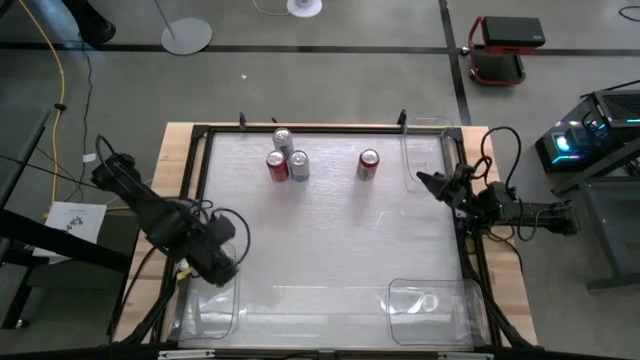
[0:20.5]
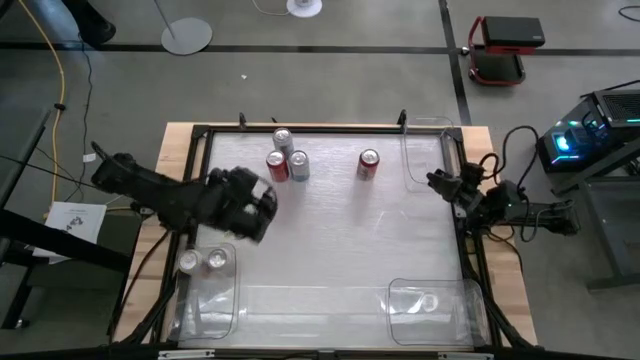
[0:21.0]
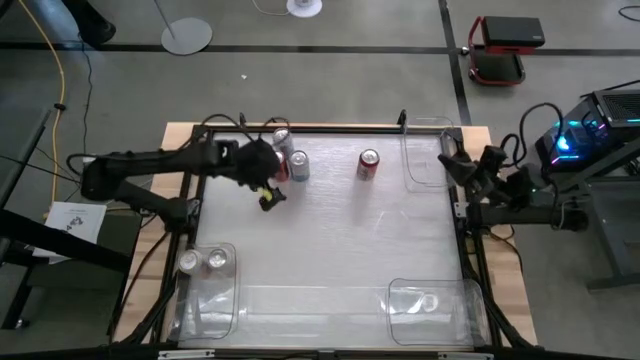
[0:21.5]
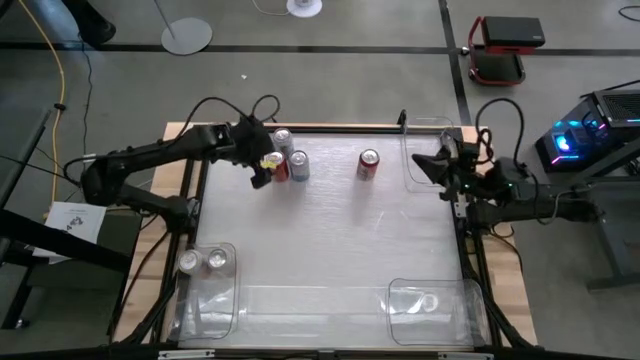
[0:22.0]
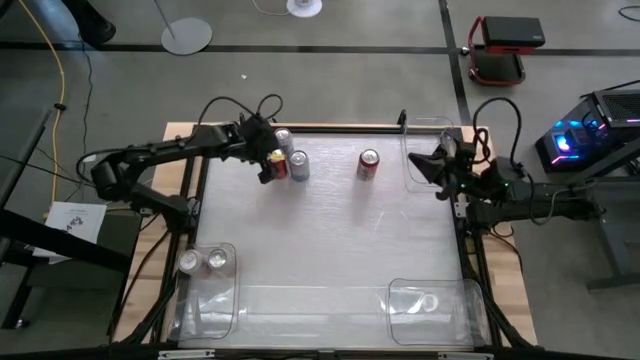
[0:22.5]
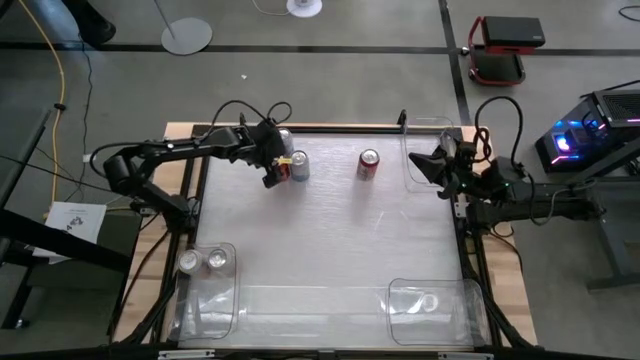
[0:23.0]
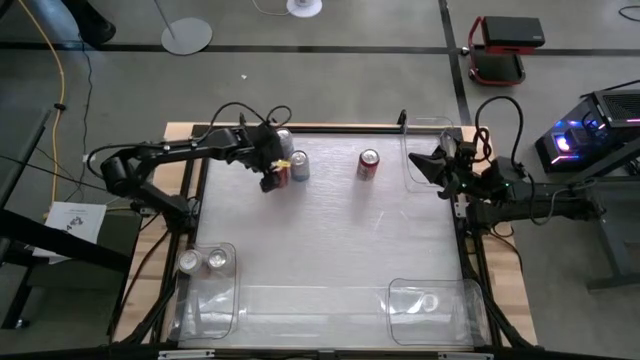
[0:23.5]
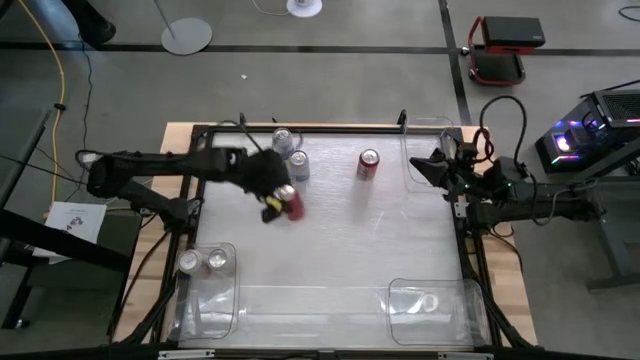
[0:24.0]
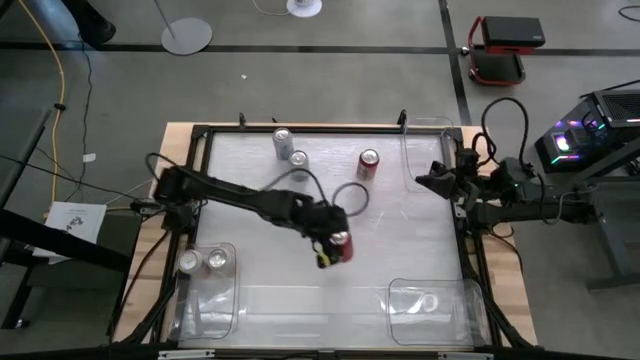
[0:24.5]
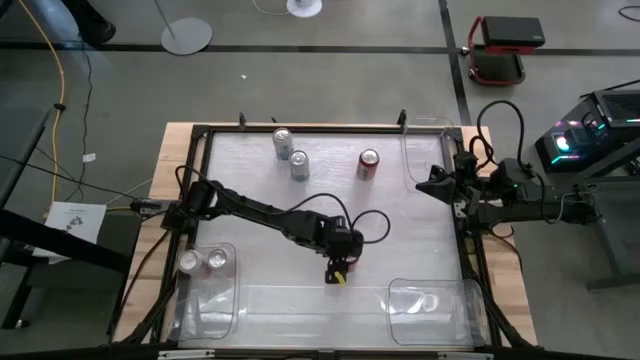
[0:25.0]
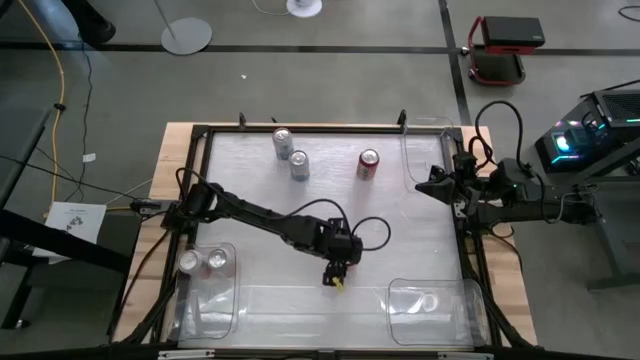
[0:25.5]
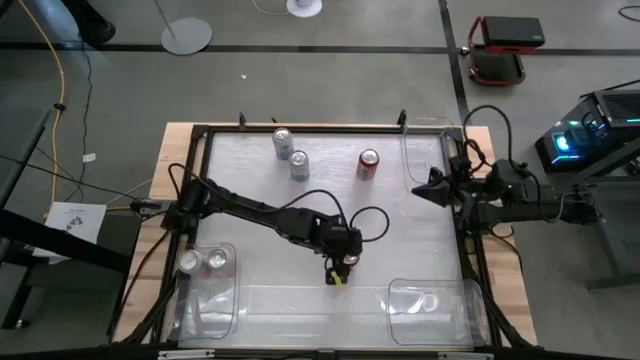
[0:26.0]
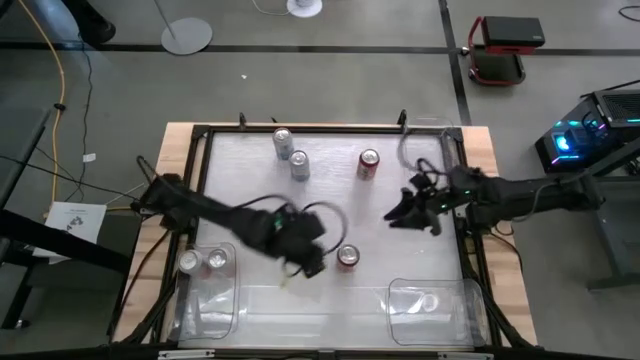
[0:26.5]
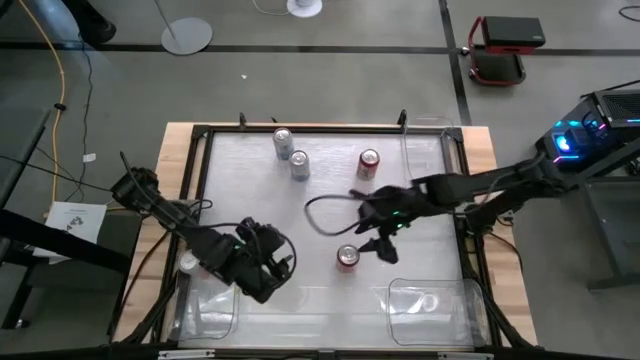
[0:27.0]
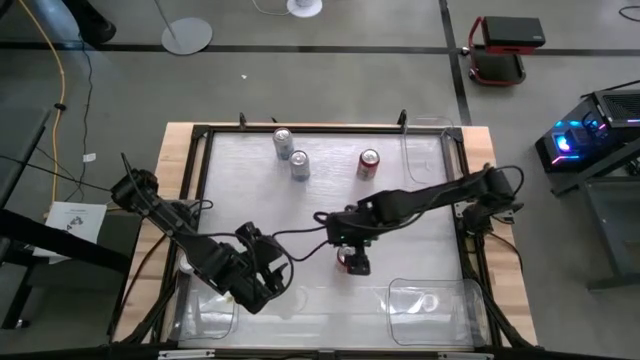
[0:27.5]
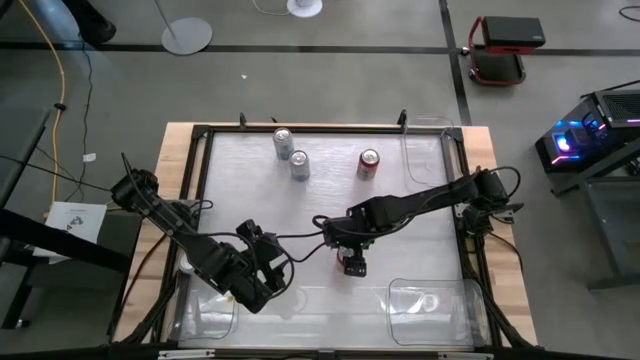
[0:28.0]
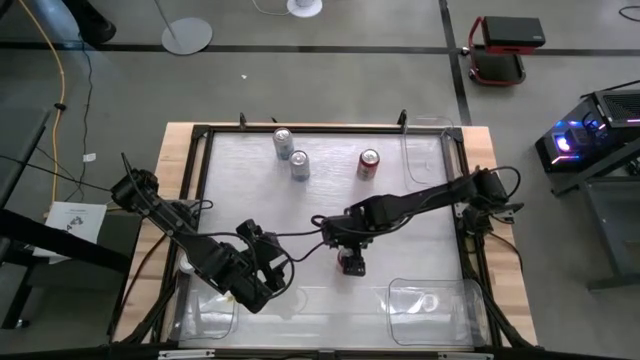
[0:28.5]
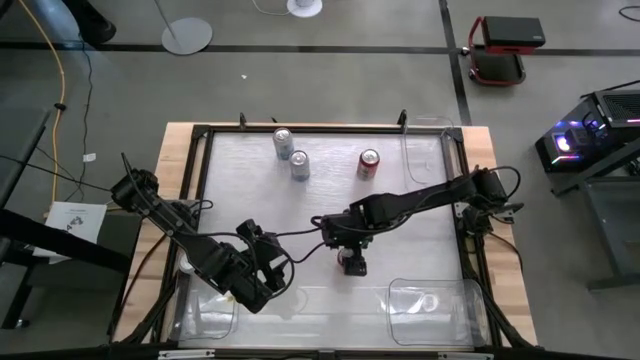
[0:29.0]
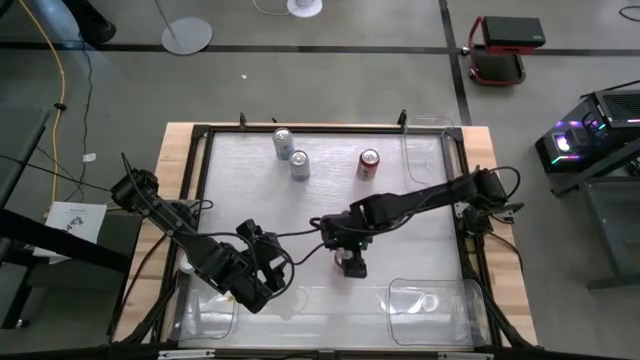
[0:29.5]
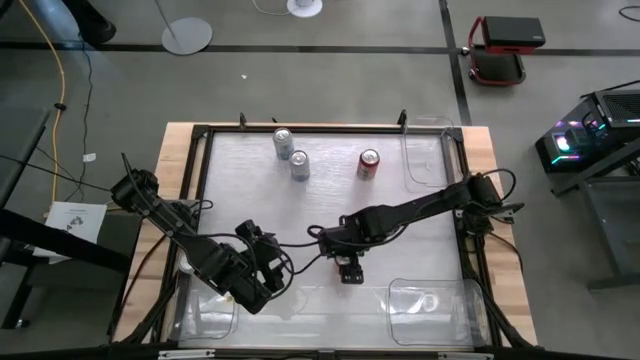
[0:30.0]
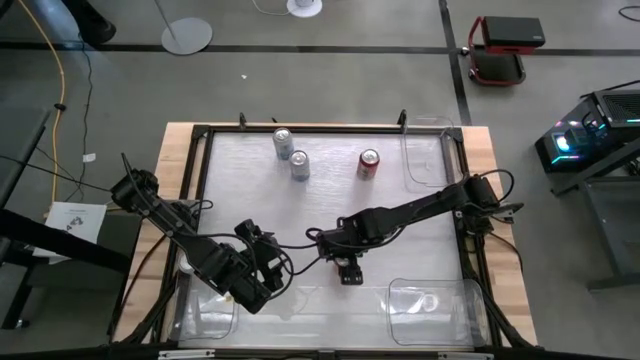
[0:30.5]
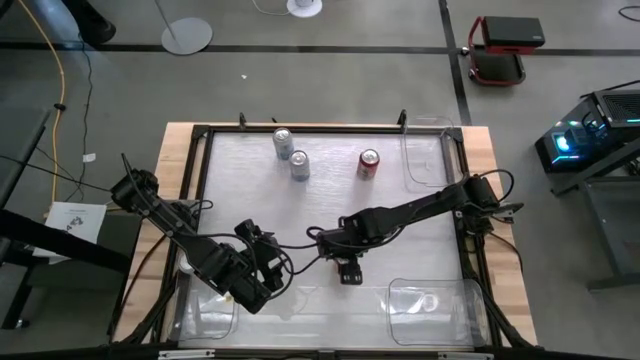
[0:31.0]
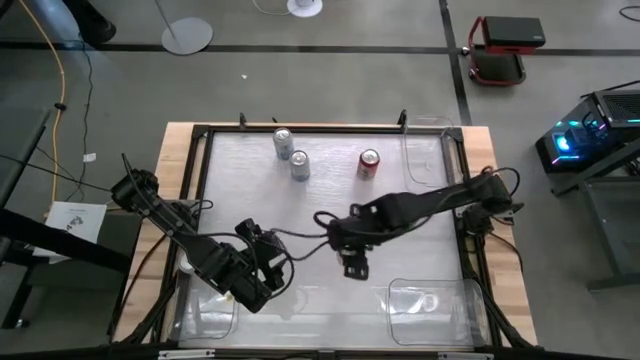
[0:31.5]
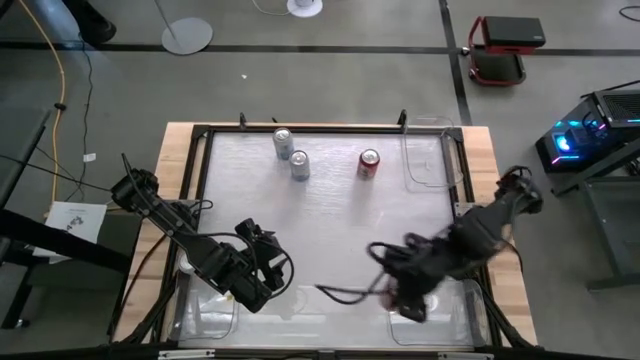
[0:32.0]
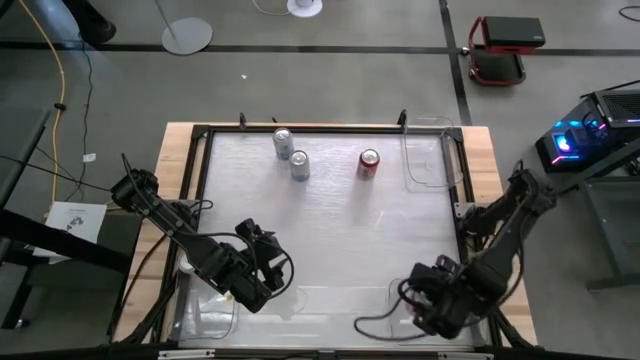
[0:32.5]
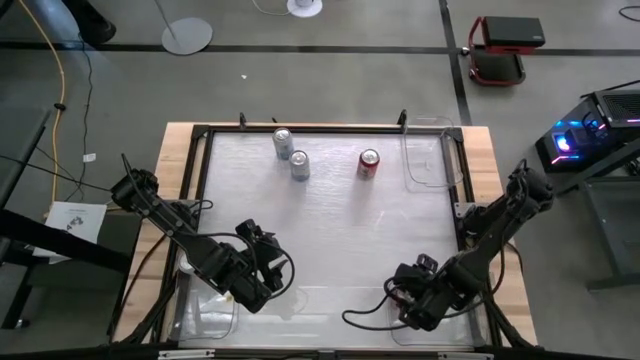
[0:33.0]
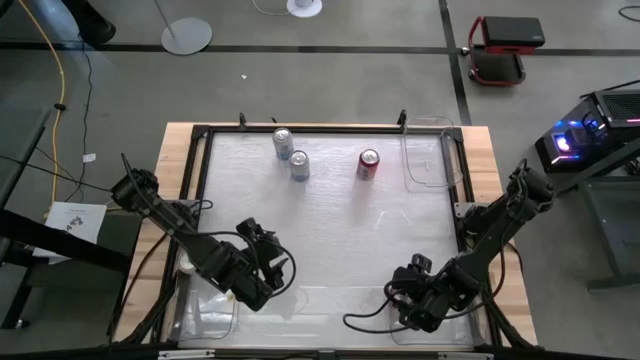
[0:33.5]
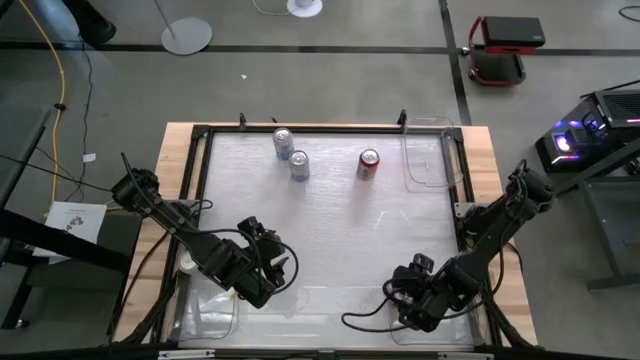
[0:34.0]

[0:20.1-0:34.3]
Task: Sort soda cans
Put the left red-black soda can into the bottom right transparent bin

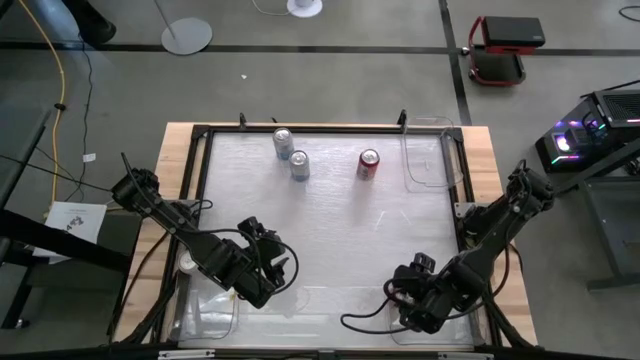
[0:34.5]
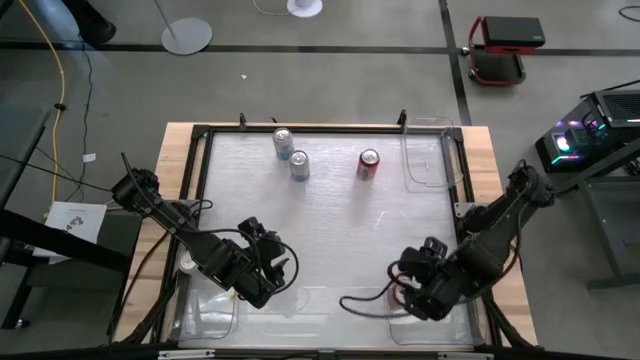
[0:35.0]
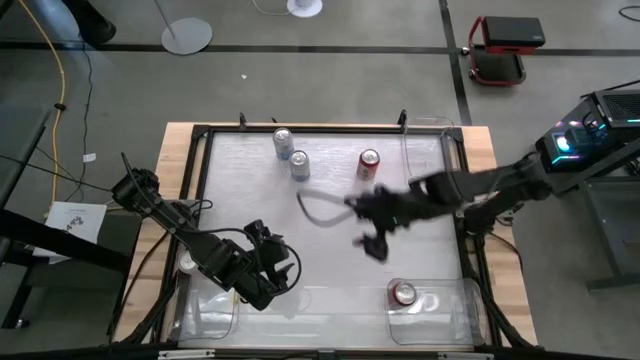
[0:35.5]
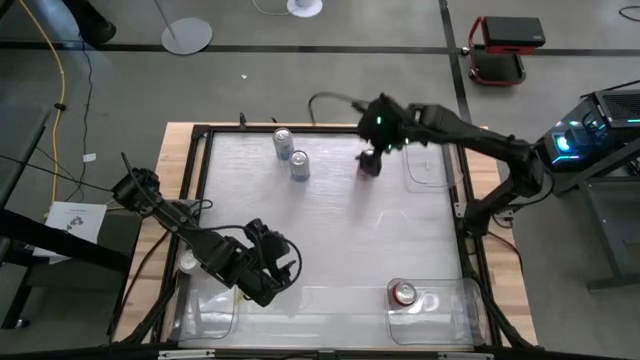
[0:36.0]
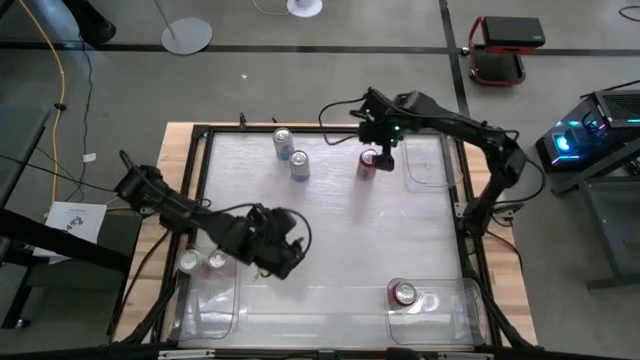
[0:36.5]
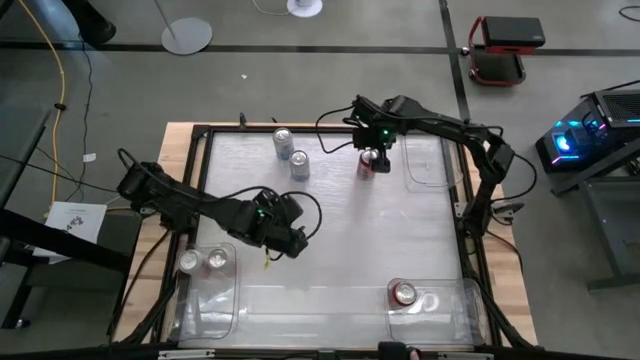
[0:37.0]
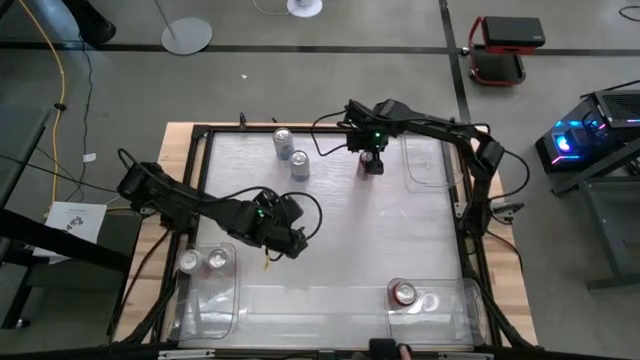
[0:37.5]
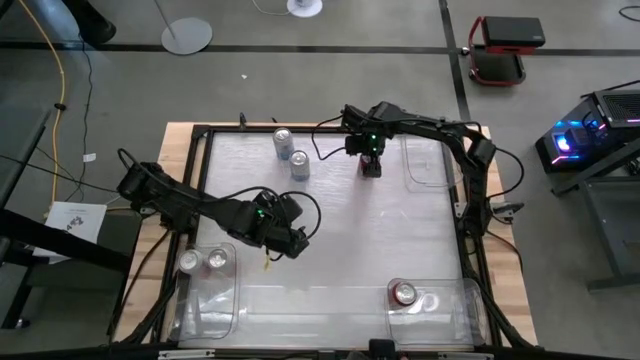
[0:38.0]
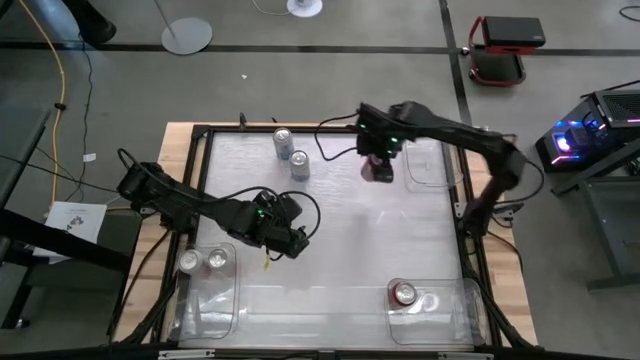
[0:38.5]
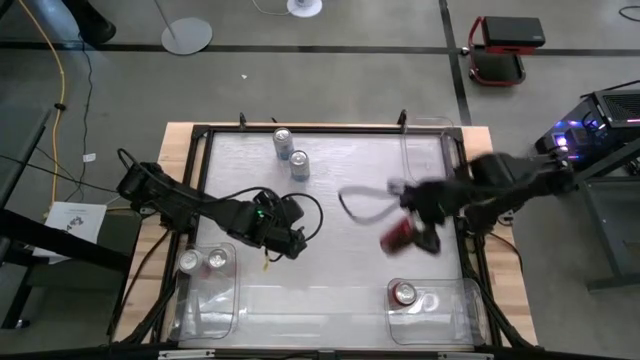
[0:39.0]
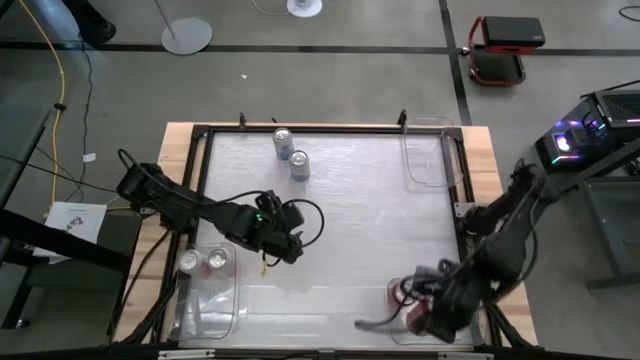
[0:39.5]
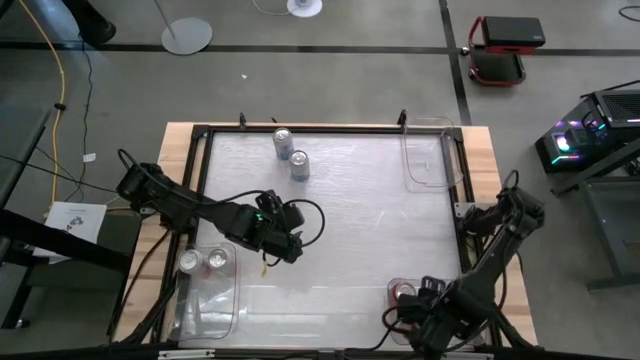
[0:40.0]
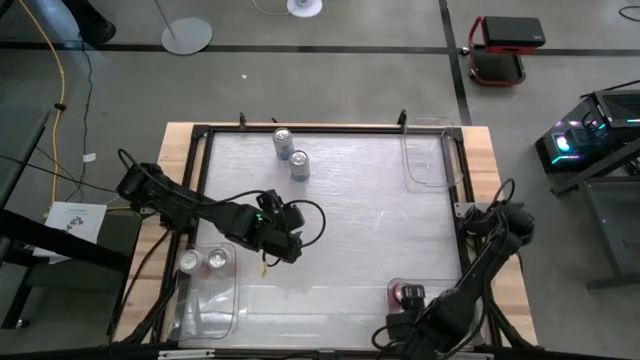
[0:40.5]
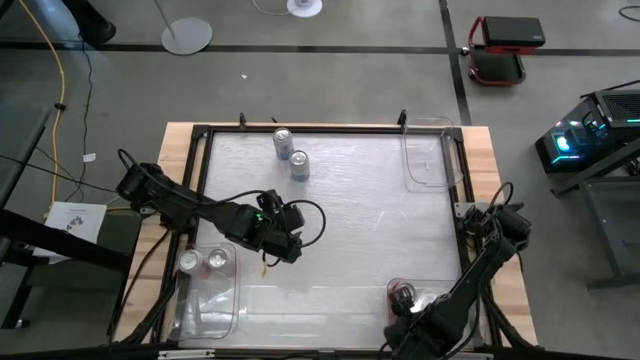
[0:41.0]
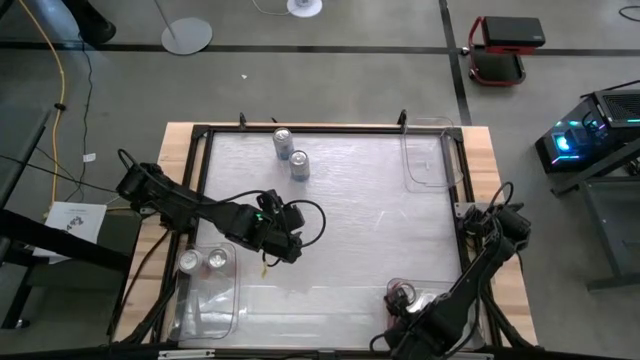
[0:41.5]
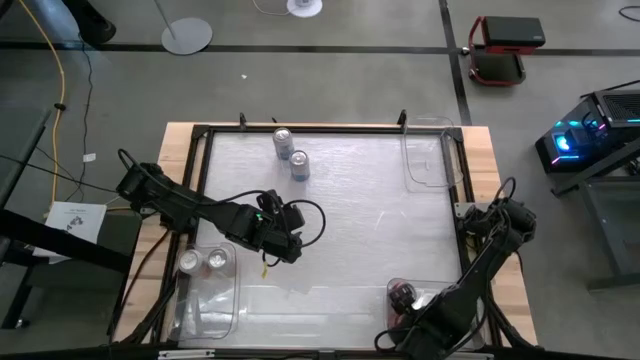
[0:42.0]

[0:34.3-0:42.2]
Put the red-black soda can into the bottom right transparent bin

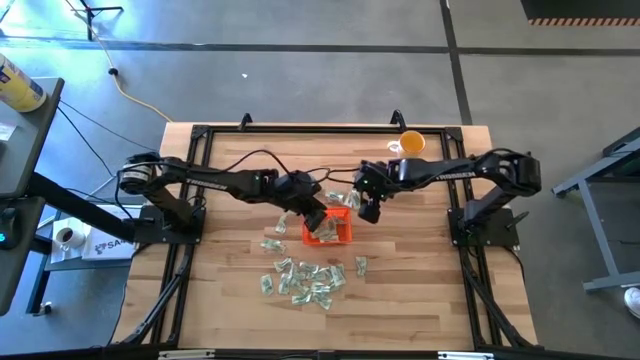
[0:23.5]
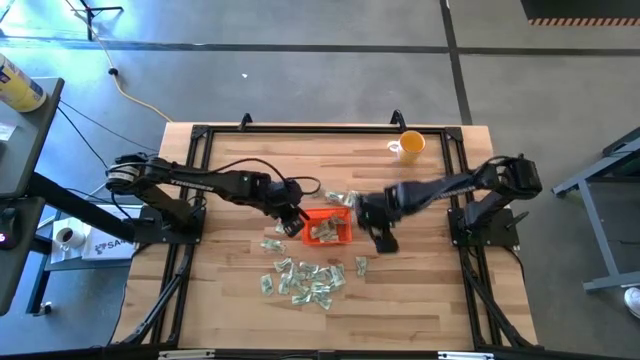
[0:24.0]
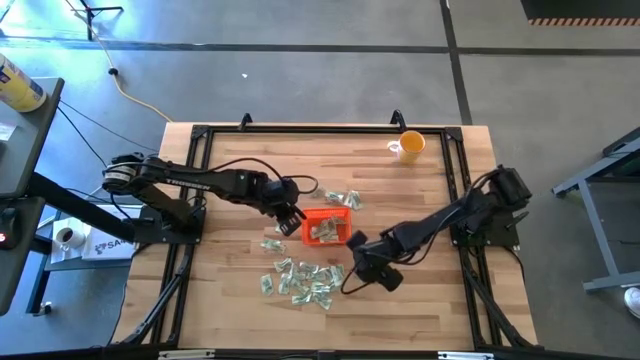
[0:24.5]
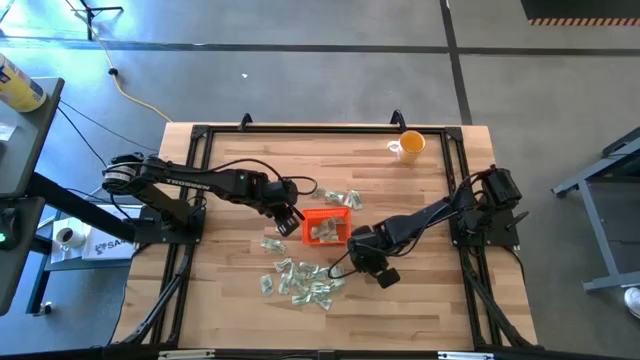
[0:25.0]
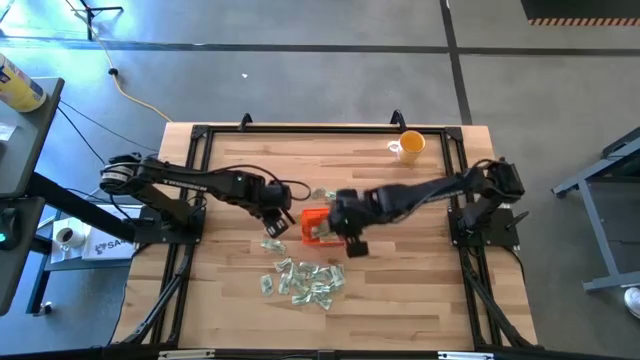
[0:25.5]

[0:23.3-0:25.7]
Task: Pick and place Stevia / Truvia into bins
Put the stevia packet into the orange bin
